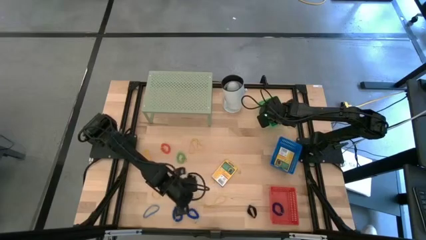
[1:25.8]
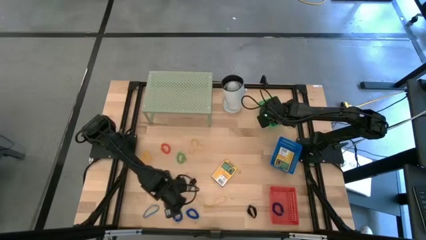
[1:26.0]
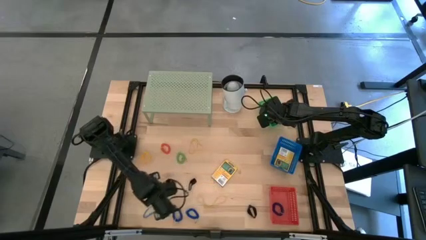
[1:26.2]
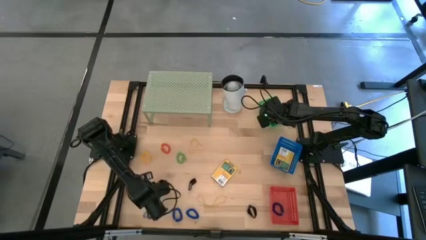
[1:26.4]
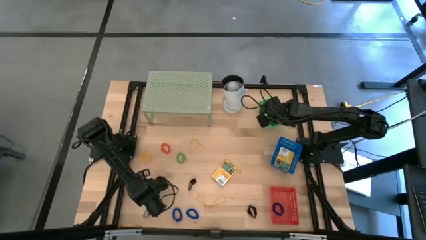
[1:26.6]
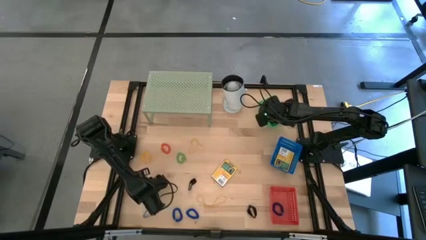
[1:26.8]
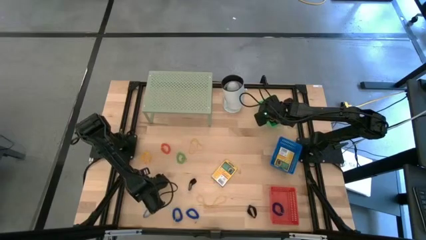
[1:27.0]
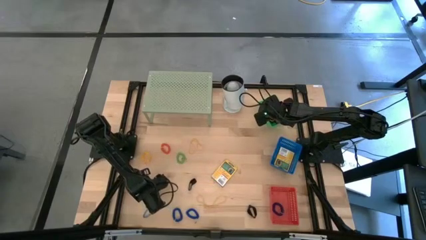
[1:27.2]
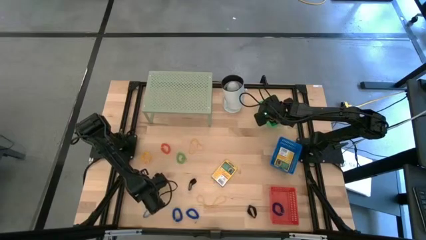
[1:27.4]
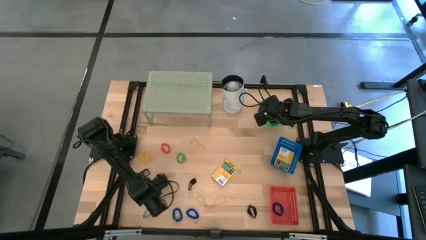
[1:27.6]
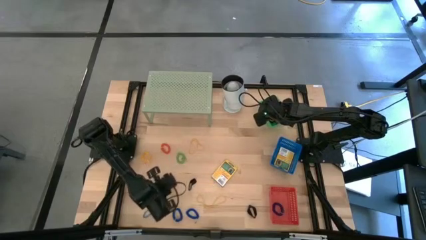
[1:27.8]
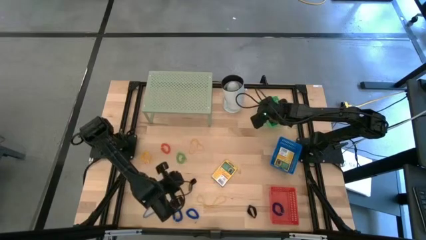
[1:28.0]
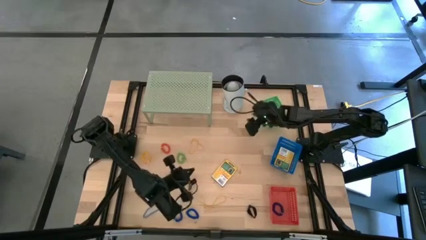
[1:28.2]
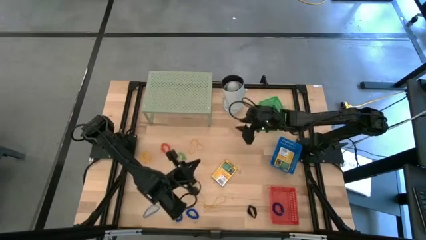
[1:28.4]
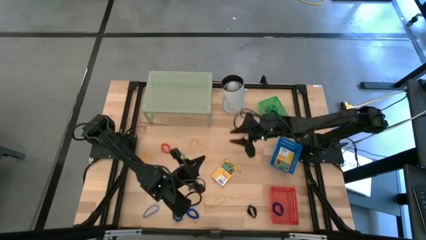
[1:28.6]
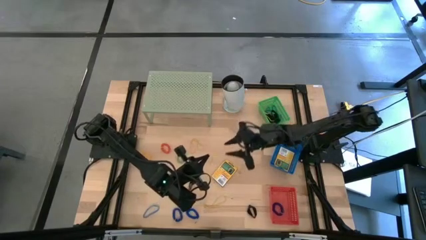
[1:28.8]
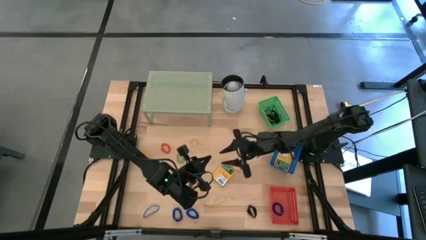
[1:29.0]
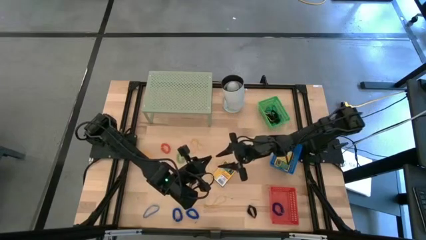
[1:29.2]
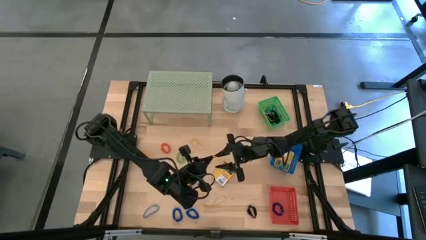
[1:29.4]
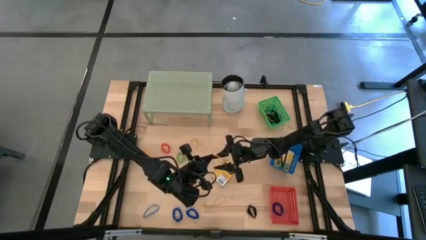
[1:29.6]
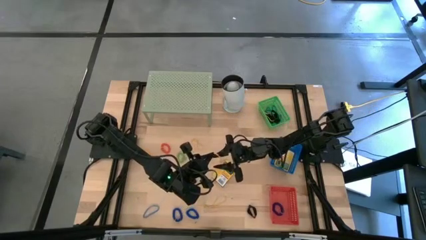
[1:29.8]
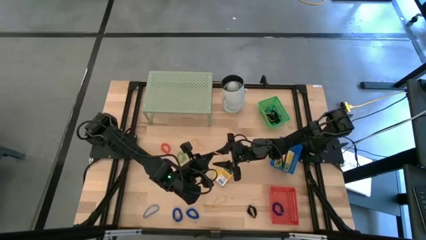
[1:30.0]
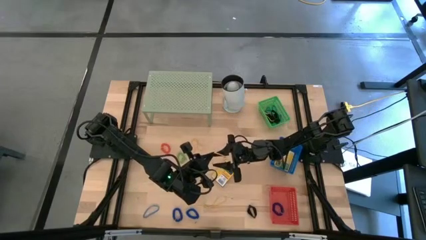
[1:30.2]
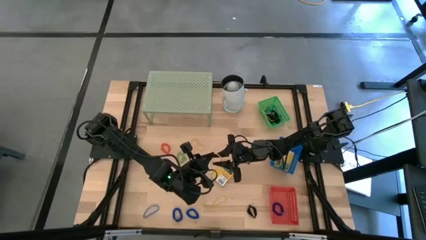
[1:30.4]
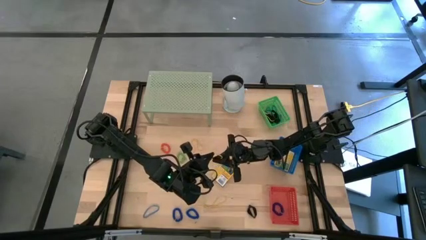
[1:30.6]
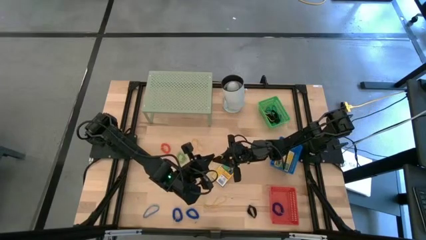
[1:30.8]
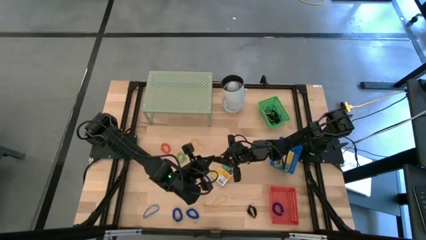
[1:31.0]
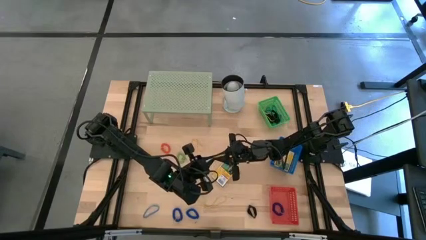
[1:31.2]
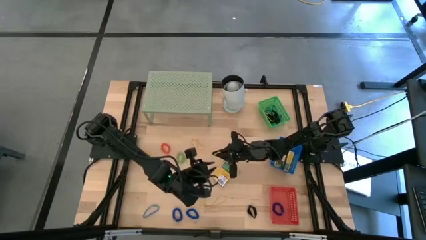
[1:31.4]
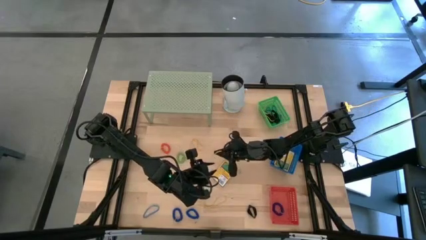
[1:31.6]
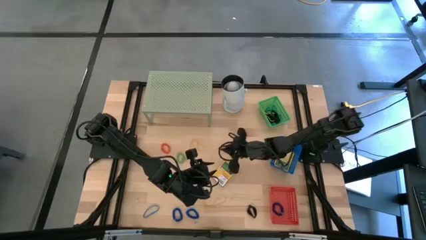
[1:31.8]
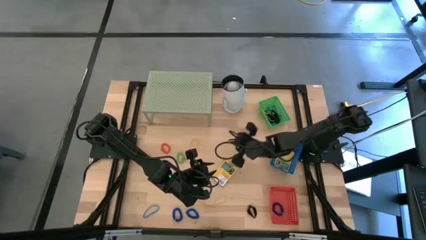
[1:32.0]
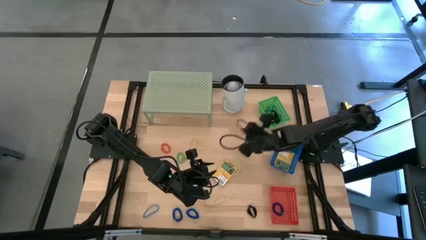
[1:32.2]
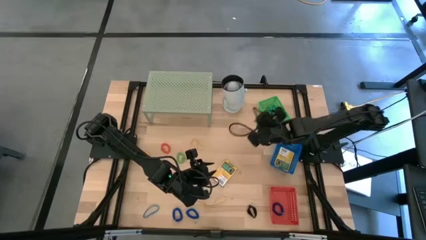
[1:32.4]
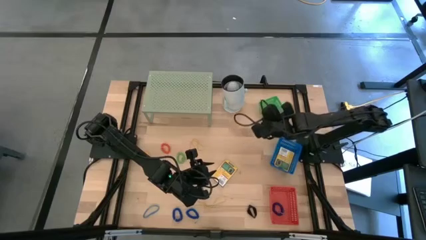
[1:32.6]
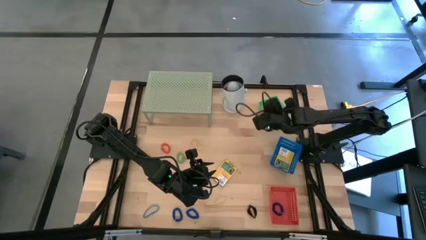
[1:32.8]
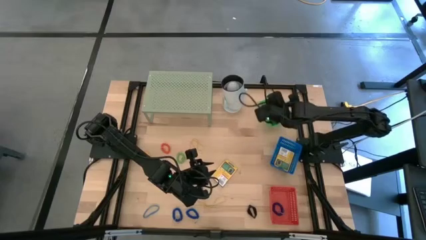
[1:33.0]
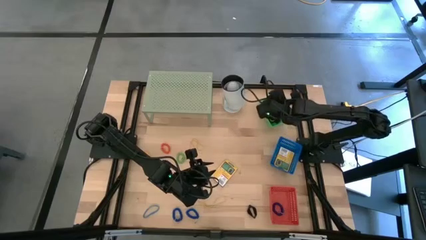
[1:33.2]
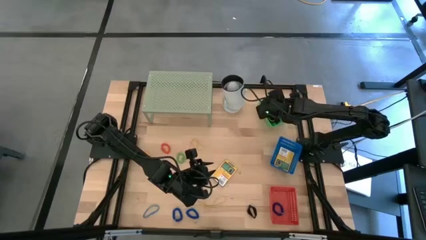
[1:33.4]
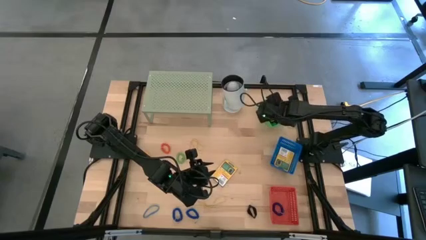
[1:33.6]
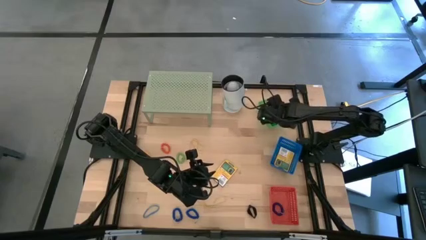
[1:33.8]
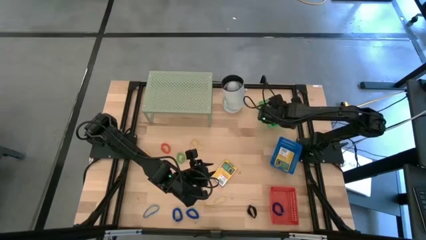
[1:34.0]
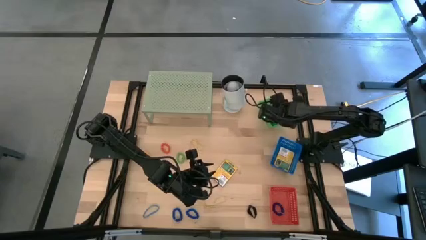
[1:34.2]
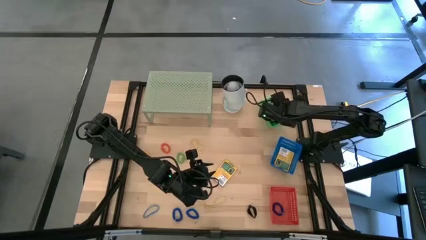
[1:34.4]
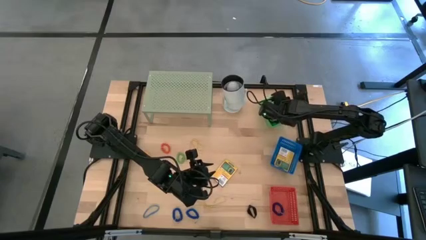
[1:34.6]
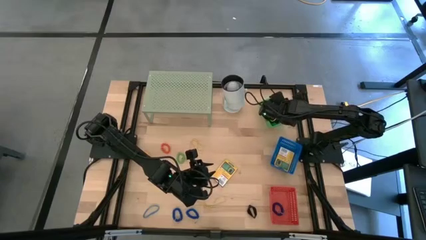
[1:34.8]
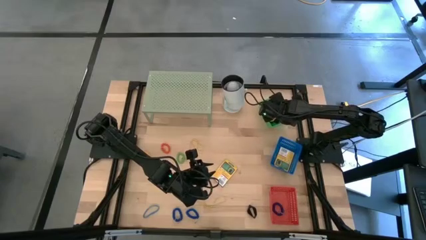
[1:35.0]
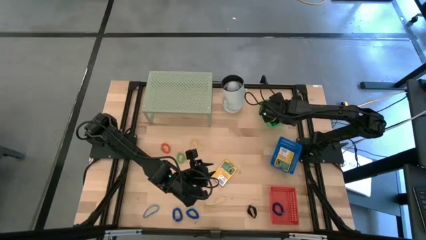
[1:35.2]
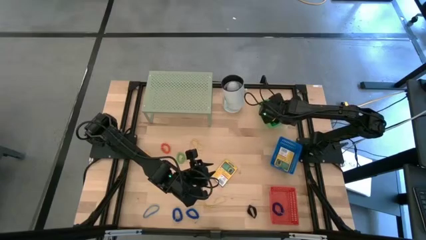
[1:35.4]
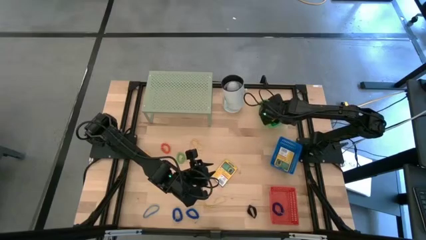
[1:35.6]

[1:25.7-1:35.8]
Task: Pick & Place Office Desk Supplies
Put the yellow rubber band into the green bin

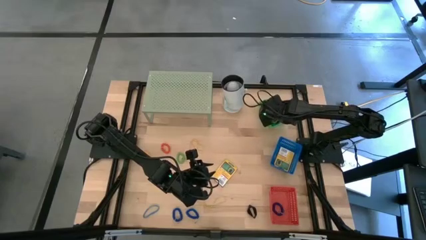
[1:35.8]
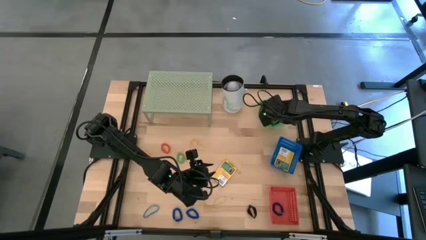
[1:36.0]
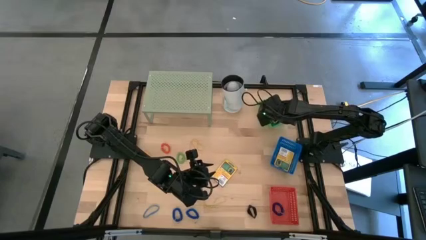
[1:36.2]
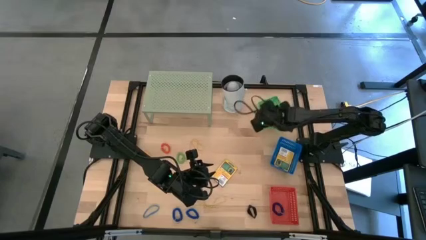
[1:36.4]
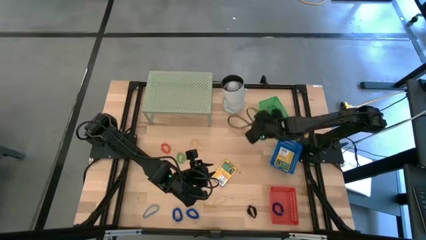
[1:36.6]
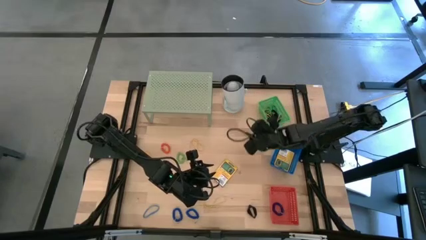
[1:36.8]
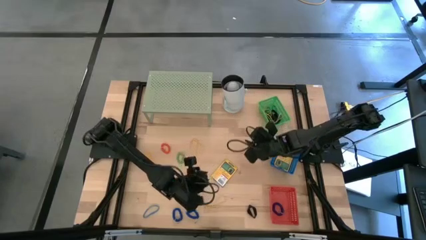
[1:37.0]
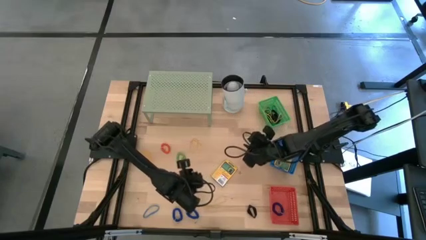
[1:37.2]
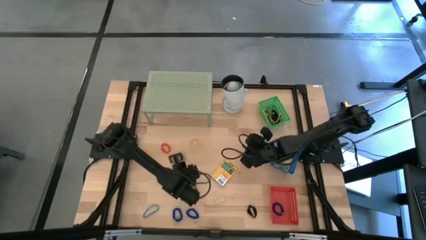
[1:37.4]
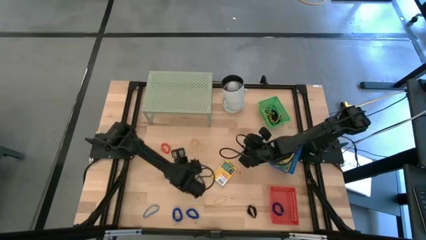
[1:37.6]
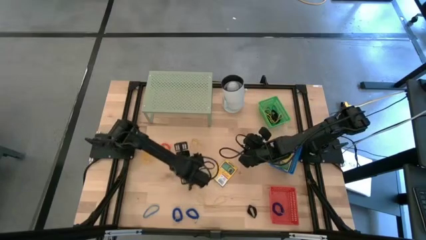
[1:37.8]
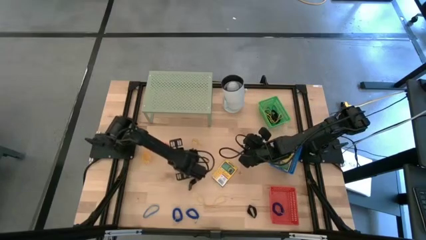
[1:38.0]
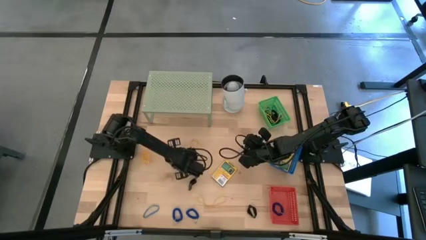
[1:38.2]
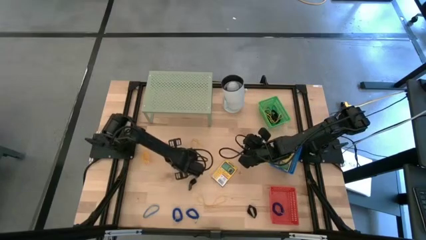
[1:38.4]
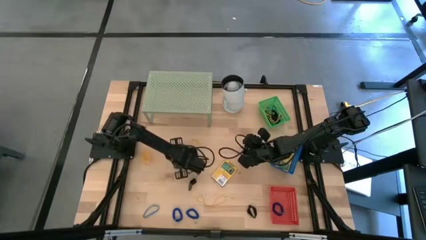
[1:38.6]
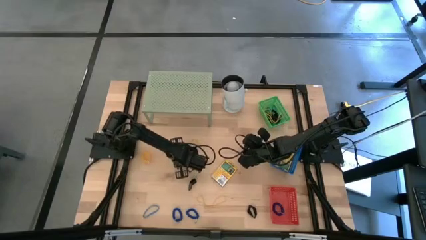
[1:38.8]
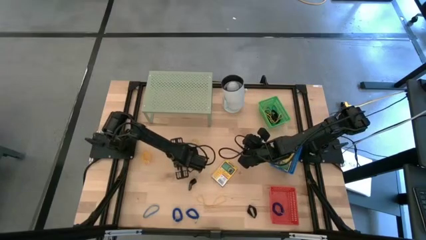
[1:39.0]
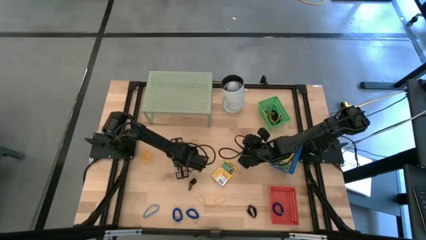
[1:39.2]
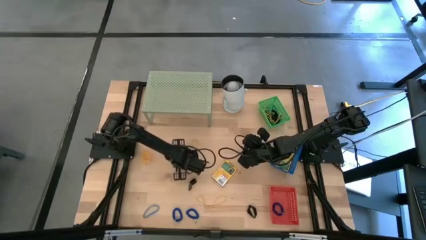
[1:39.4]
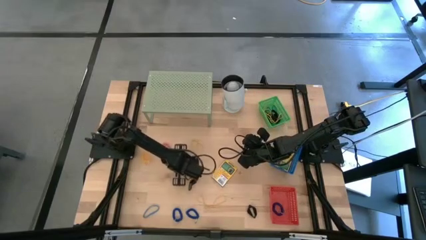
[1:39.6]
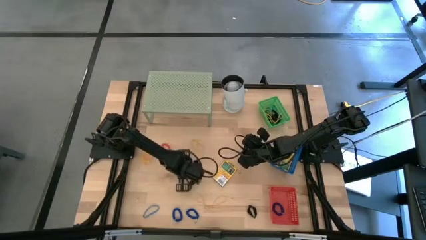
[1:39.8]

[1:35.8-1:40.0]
Put the green spiral keychain into the red bin

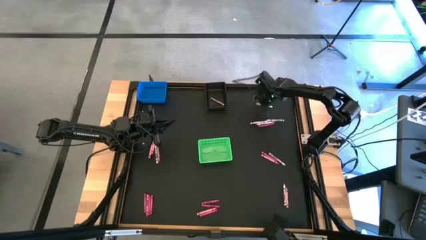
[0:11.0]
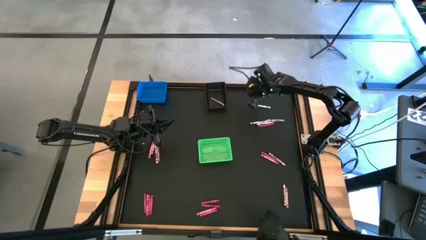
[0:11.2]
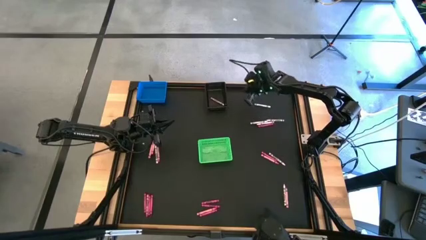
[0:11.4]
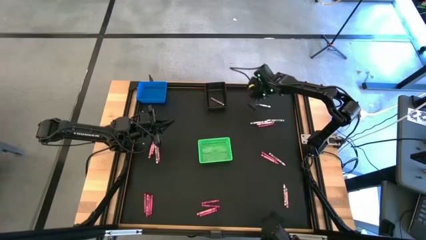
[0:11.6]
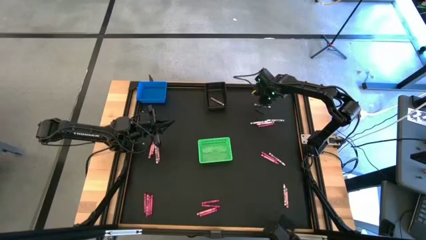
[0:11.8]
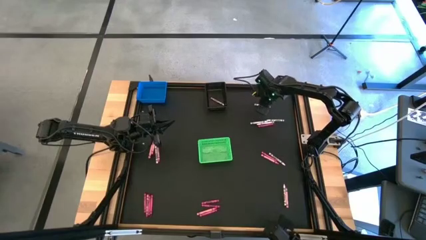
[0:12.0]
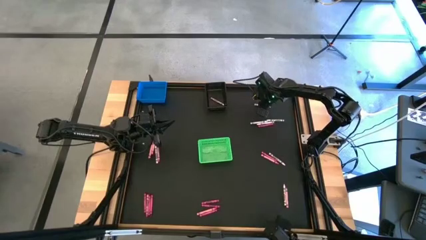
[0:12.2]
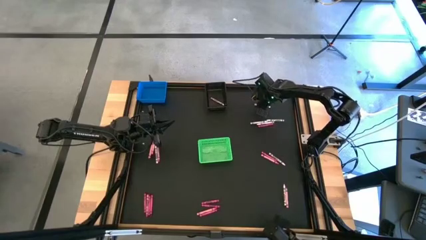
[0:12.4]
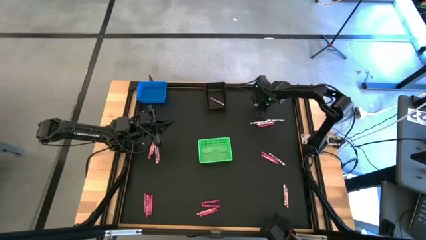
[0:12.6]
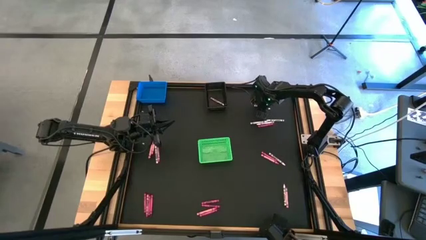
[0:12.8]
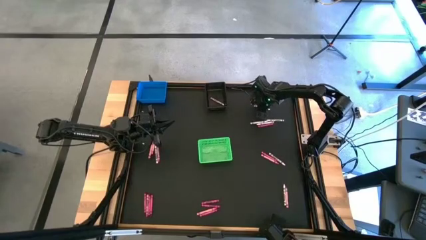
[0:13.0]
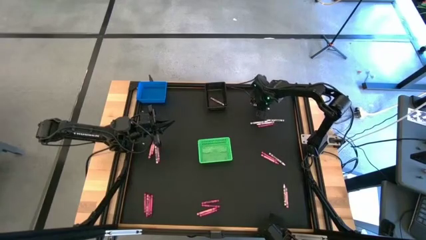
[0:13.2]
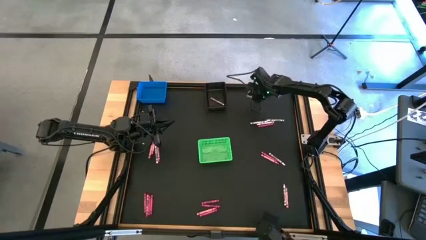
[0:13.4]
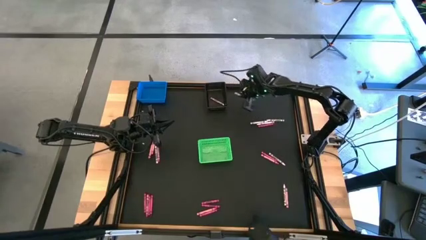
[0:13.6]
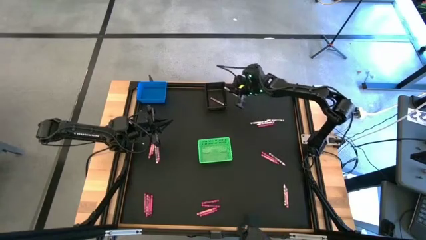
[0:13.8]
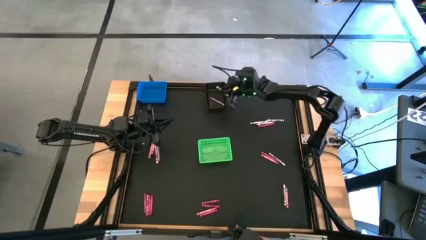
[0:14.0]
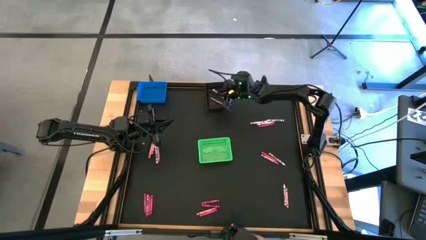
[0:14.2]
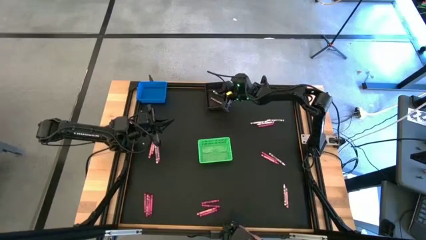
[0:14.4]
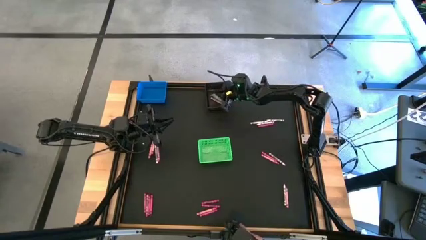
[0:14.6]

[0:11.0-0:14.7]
Task: Sort crayons
Put the white crayon into the black bin
